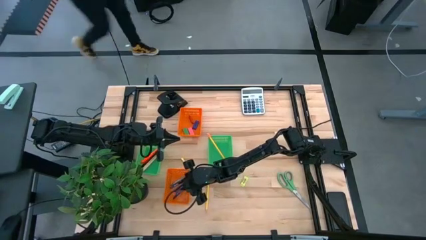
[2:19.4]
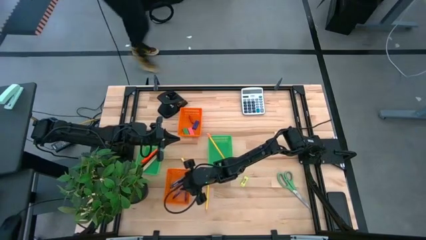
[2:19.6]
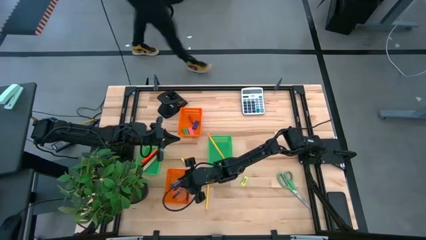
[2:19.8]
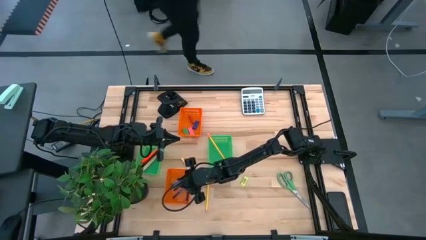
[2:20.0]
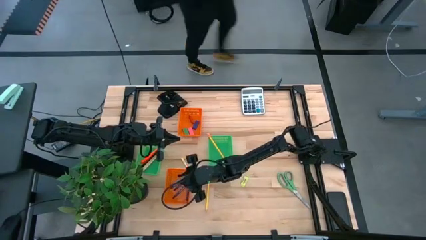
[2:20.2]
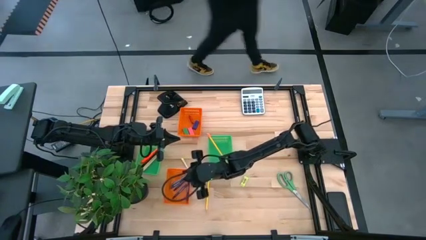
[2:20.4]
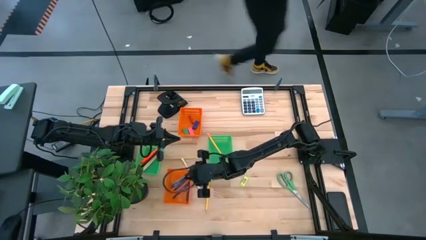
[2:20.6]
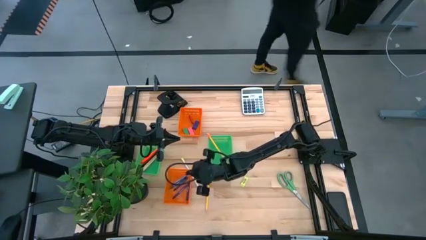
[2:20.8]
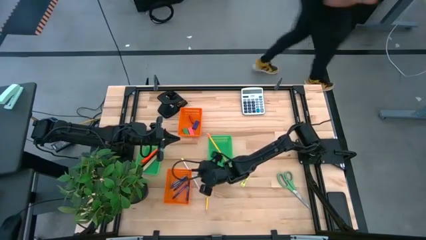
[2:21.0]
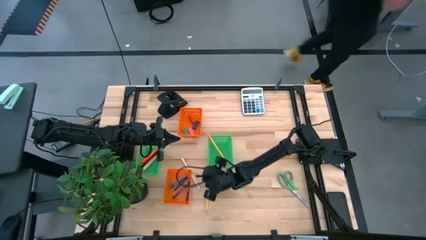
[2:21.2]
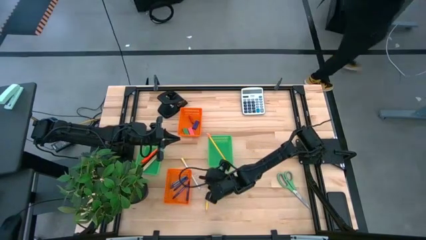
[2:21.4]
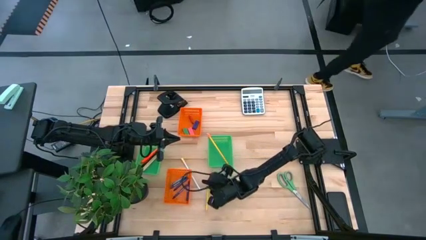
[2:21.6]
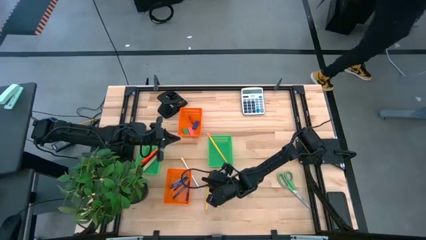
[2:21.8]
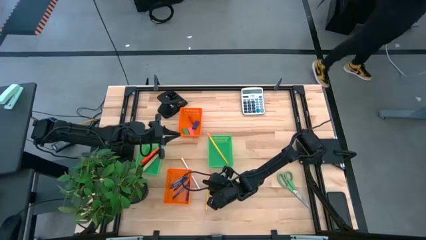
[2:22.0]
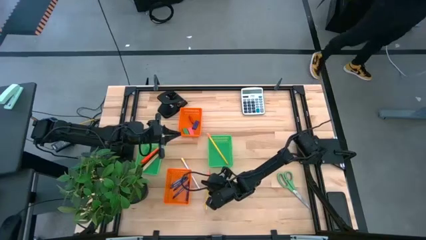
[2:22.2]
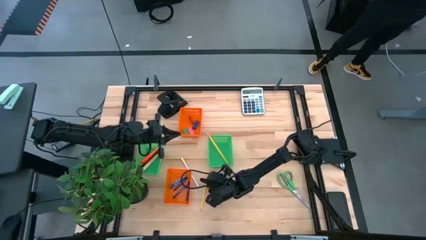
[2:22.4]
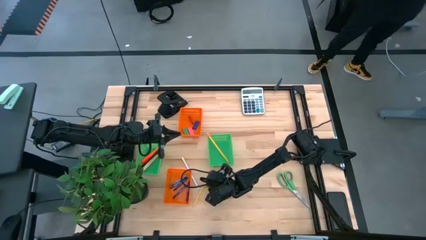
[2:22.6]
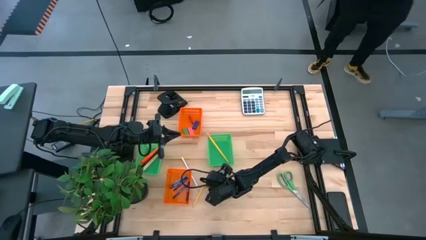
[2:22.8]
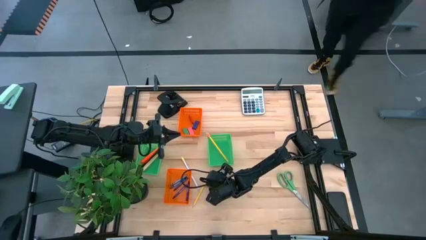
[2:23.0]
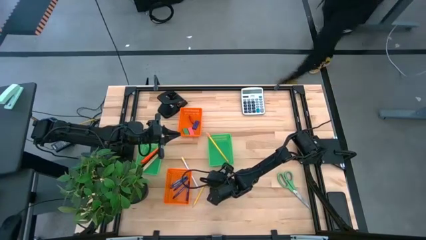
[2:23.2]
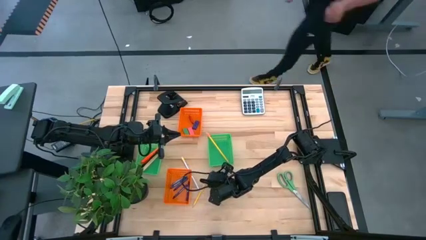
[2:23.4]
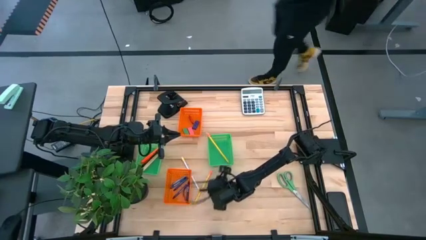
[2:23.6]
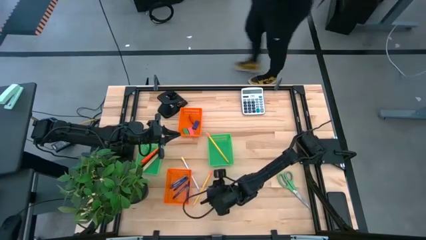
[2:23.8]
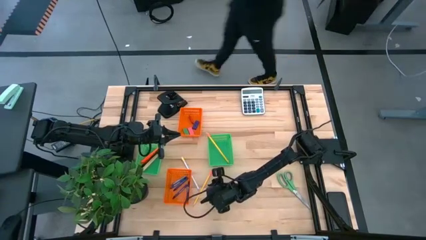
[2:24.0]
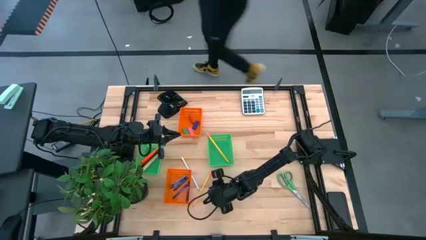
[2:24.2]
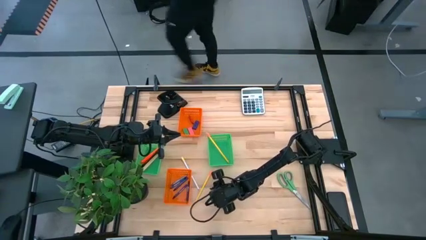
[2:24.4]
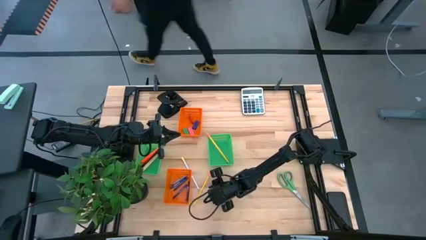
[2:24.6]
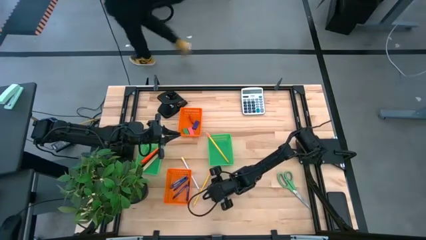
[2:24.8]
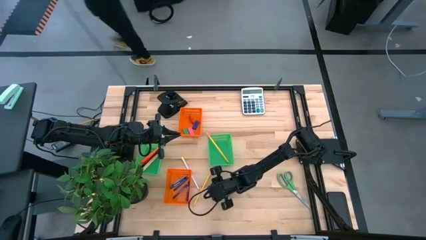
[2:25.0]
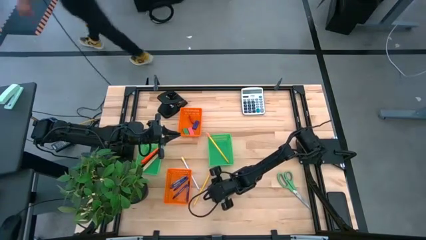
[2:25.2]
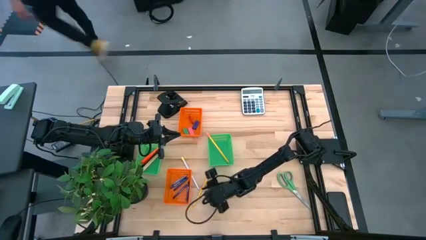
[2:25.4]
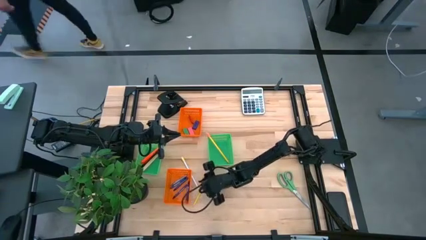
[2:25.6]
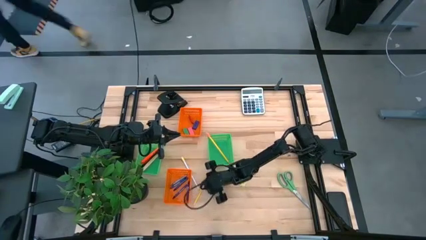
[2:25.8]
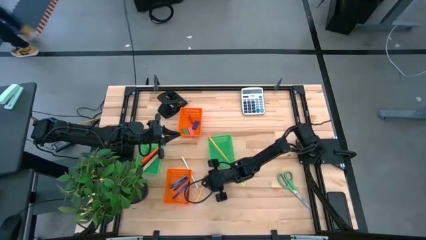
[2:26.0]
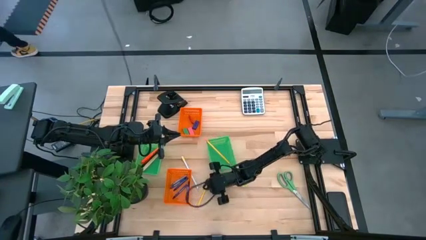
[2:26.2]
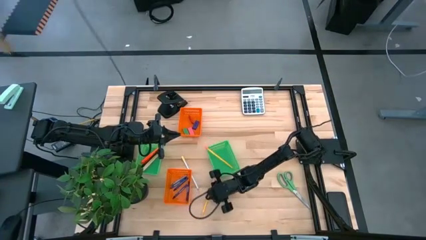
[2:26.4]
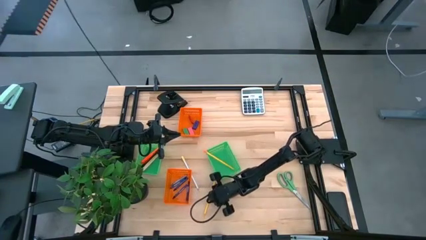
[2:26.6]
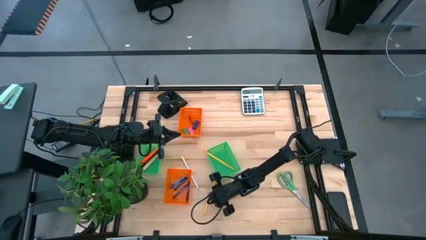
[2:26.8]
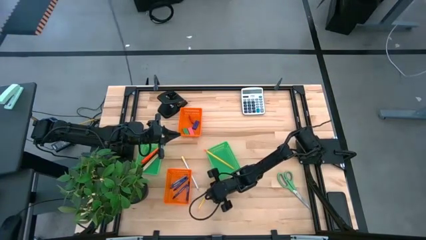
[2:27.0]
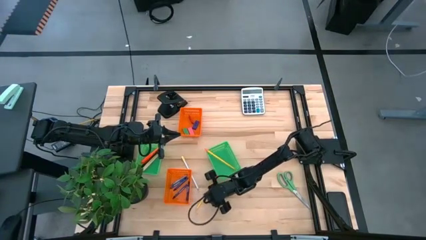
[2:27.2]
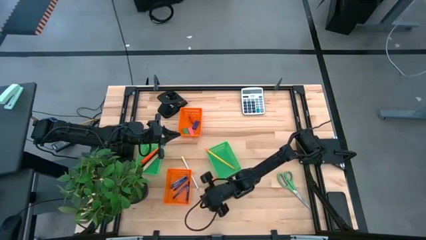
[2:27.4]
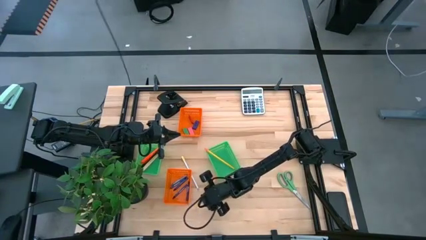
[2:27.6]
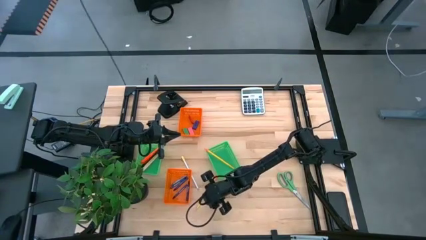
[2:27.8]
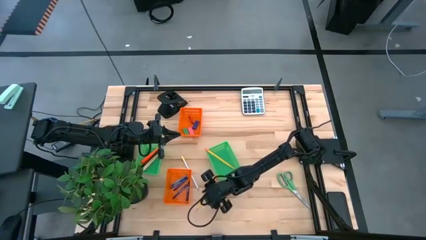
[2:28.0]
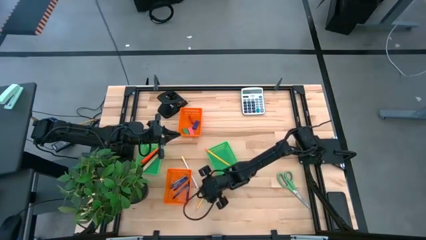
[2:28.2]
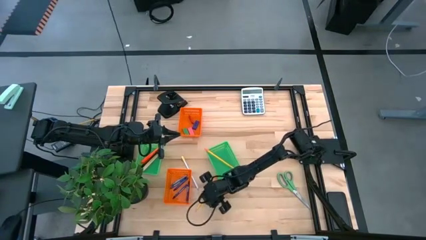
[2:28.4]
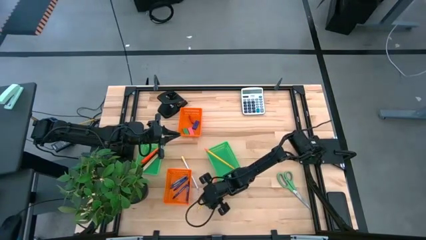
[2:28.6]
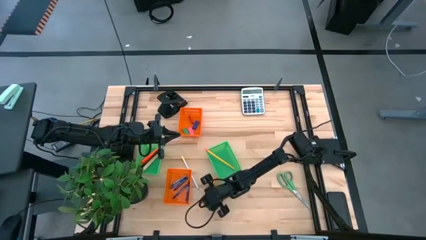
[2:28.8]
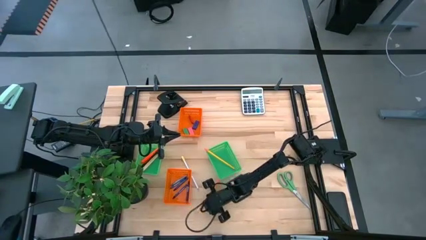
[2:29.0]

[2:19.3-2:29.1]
Task: Sort crayons/erasers/pens/pencils in bins
Put the yellow pencil into the right green basket

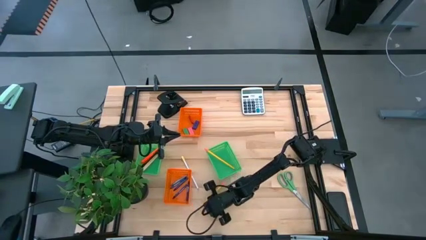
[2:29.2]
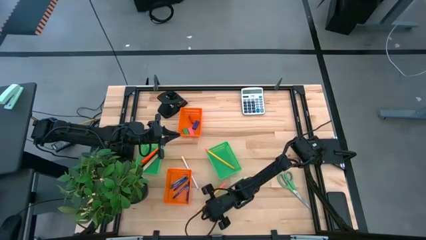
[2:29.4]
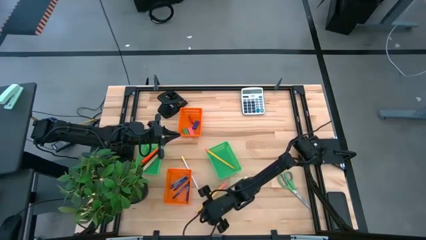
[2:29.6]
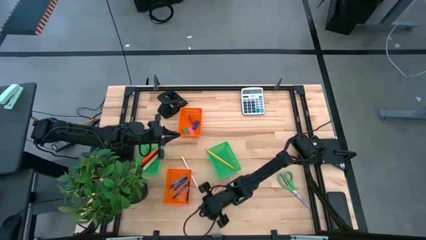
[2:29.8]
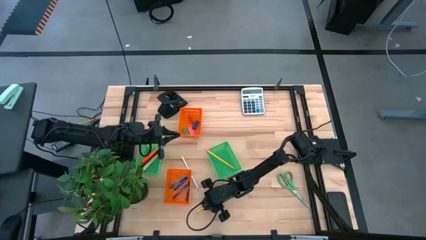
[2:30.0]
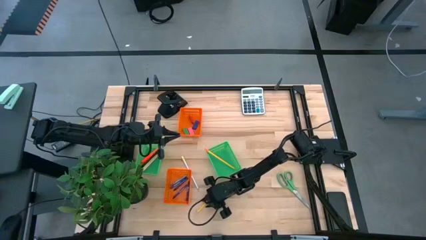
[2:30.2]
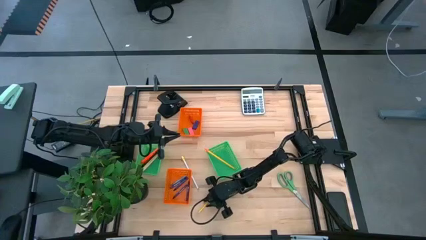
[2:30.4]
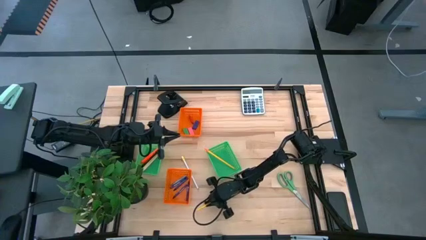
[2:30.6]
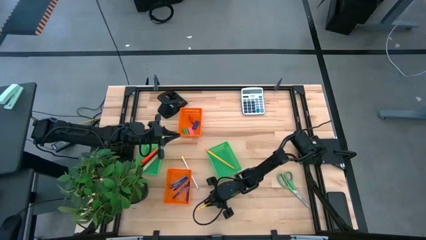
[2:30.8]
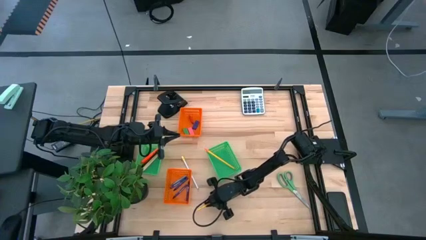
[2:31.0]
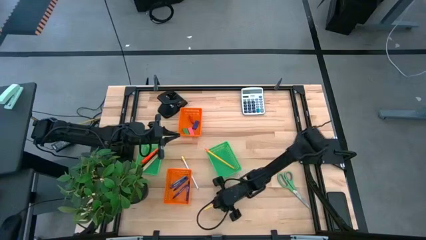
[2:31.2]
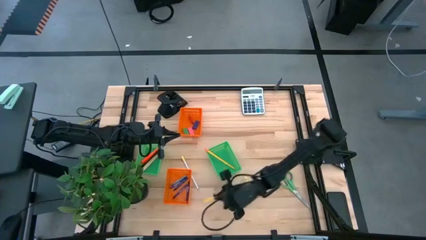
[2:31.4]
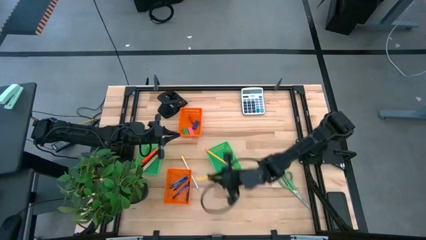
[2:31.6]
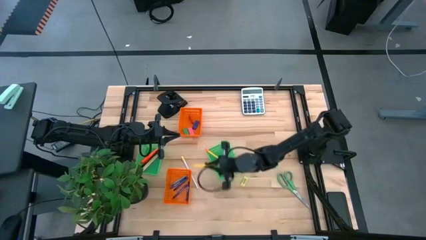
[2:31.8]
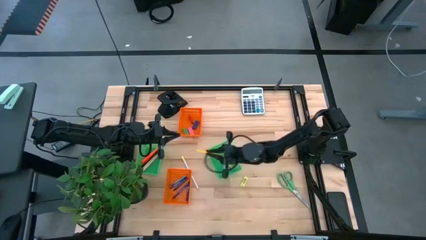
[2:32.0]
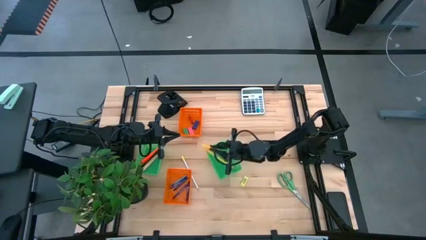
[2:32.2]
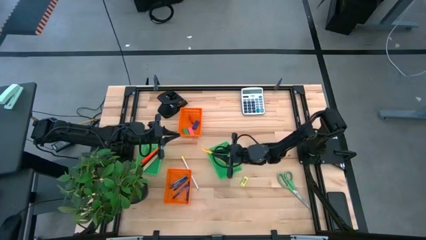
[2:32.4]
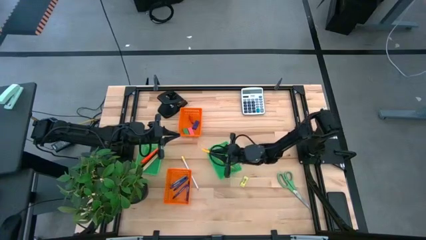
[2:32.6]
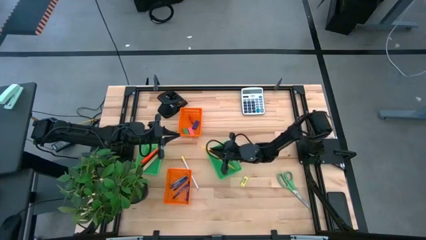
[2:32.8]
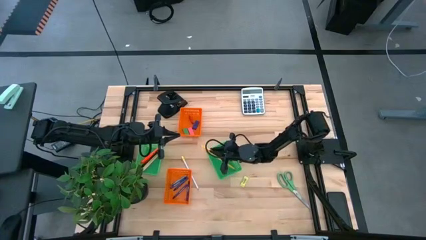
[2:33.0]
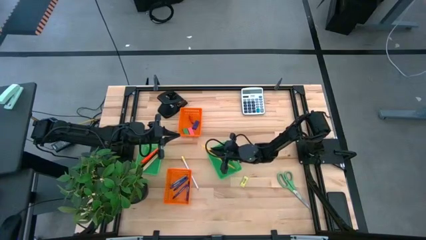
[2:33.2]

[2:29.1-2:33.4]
Put the yellow pencil into the right green basket

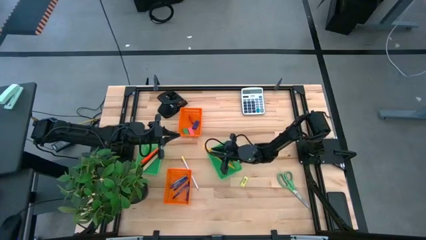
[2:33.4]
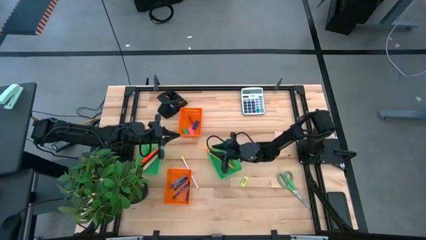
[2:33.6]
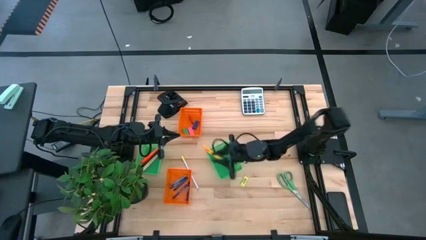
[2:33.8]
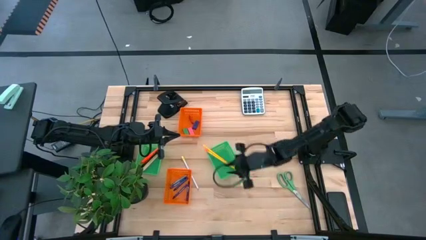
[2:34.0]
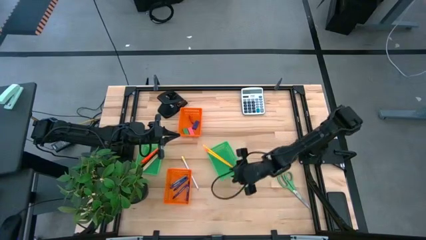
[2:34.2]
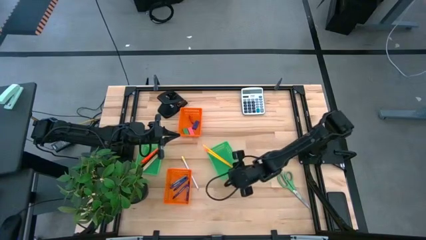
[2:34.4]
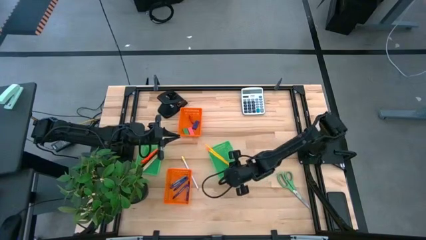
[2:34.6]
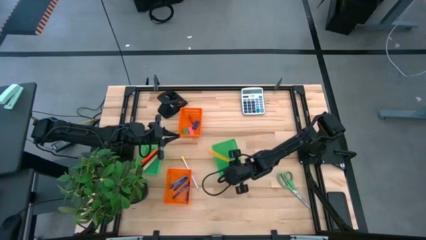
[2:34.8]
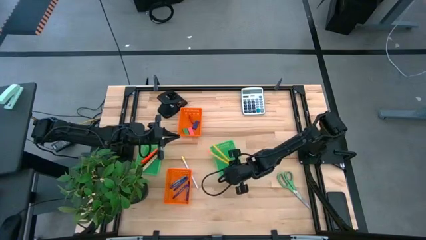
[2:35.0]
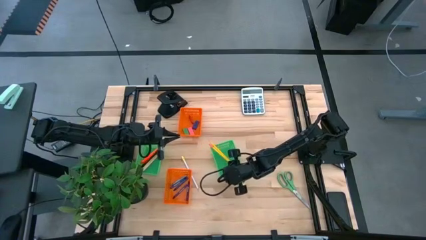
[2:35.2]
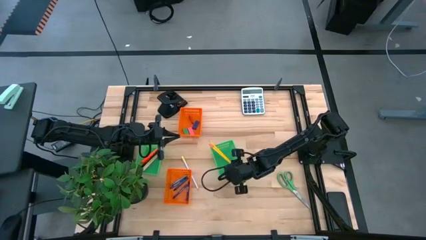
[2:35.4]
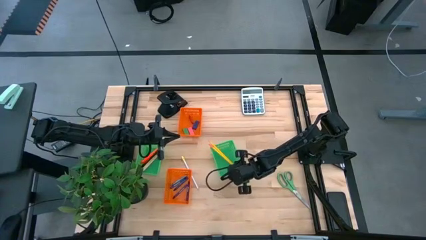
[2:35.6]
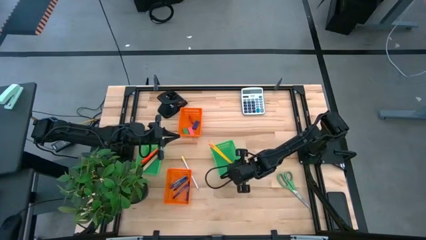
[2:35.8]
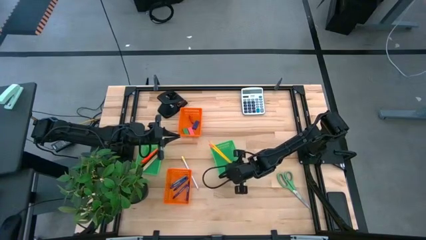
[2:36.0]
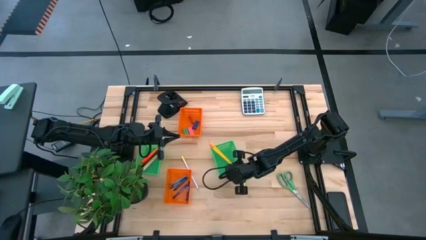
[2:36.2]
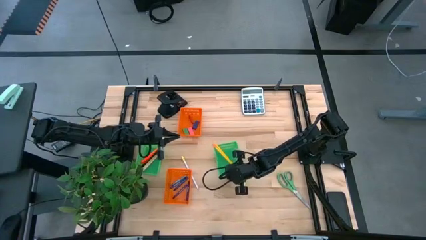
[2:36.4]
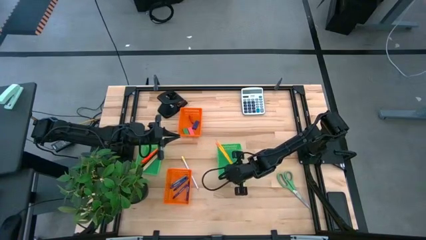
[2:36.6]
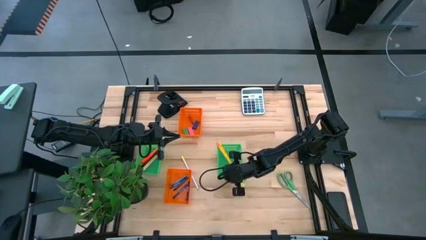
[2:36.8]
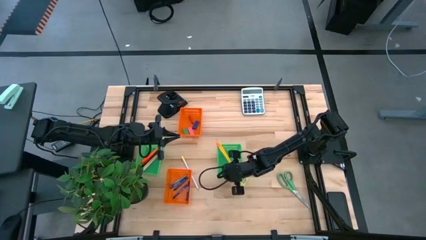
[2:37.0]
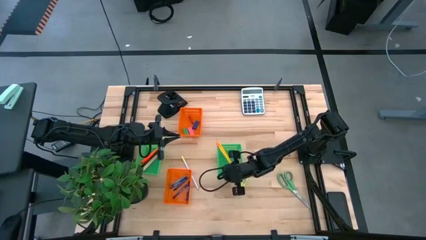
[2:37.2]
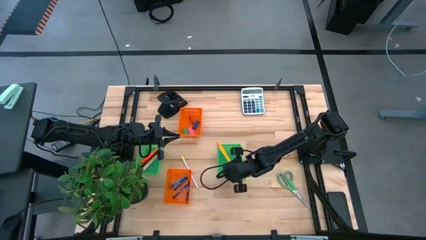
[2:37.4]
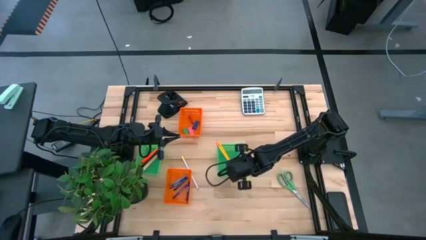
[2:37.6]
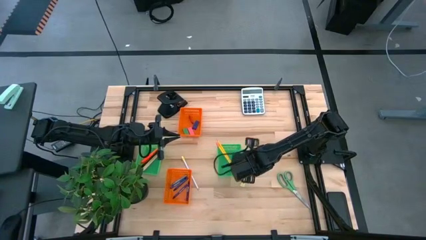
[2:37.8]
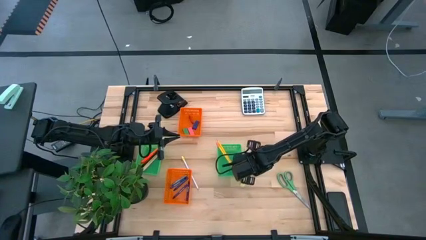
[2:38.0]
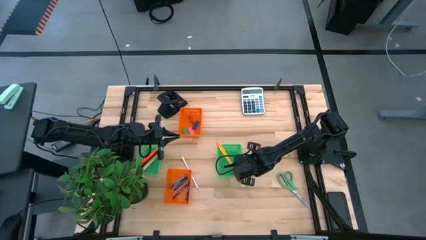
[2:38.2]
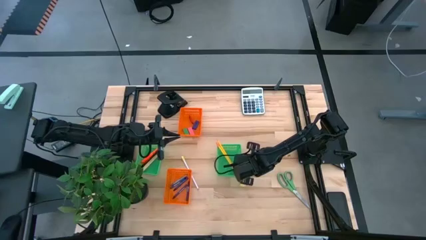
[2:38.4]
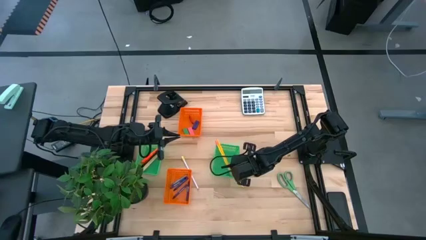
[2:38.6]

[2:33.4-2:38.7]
Adjust the right green basket
